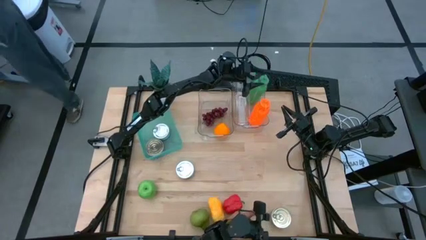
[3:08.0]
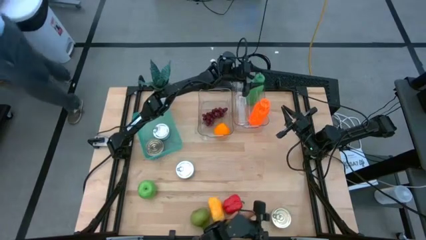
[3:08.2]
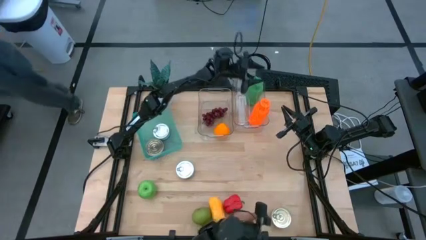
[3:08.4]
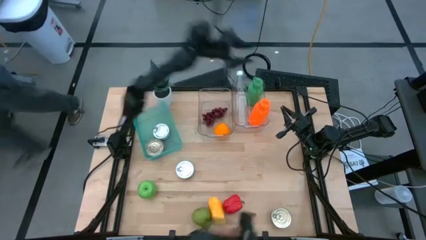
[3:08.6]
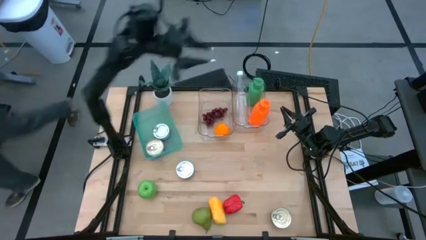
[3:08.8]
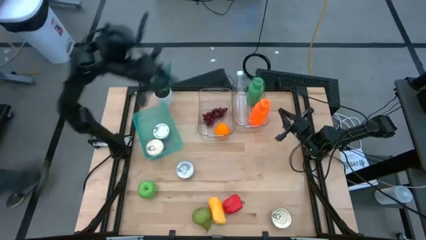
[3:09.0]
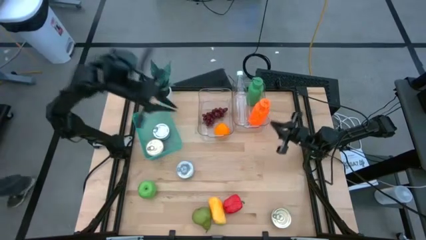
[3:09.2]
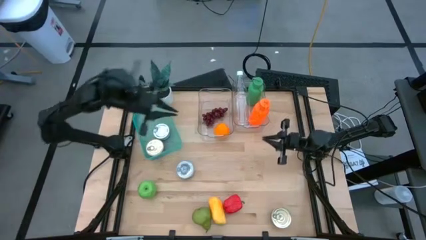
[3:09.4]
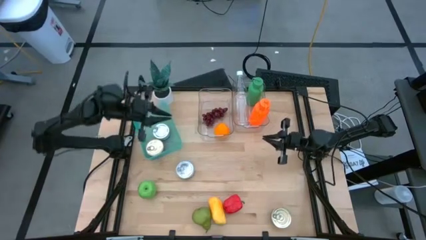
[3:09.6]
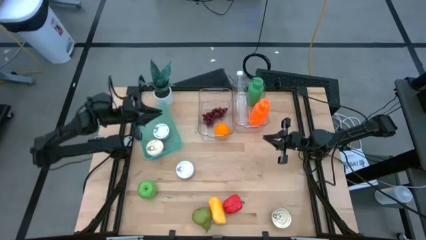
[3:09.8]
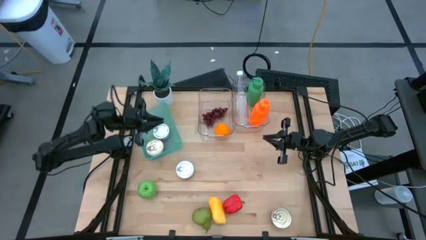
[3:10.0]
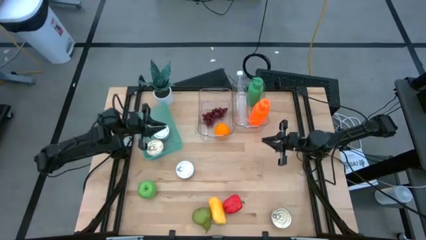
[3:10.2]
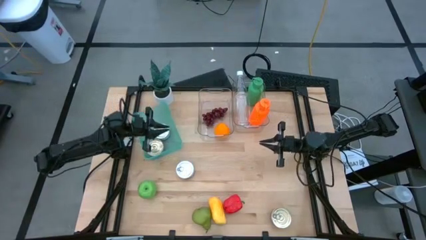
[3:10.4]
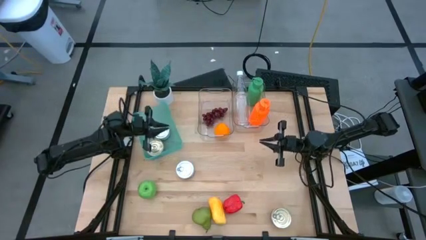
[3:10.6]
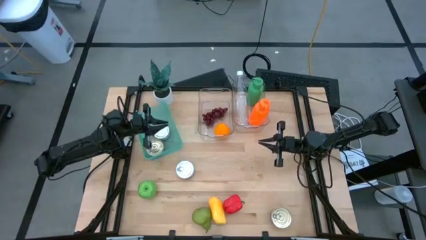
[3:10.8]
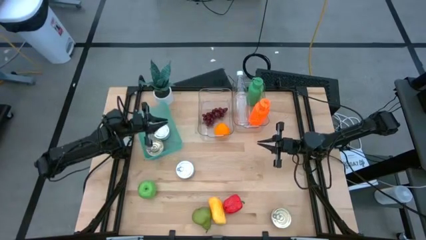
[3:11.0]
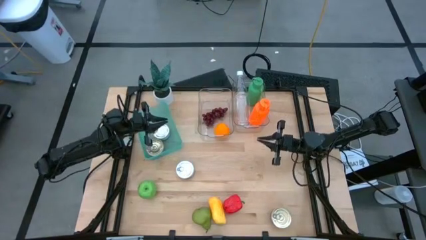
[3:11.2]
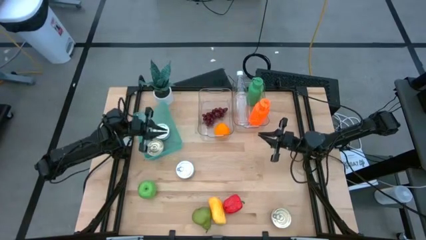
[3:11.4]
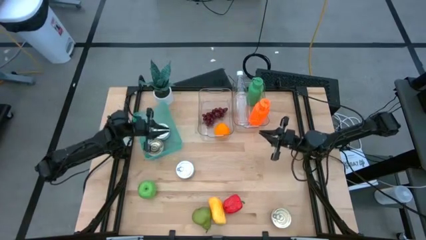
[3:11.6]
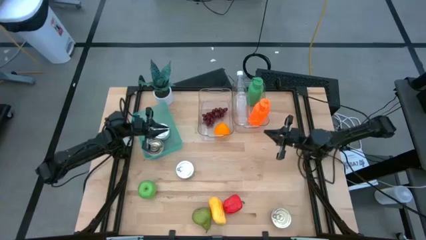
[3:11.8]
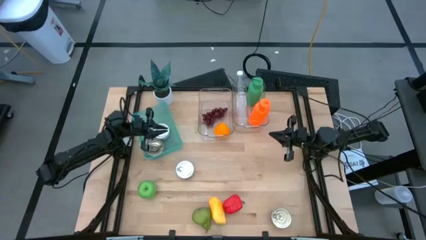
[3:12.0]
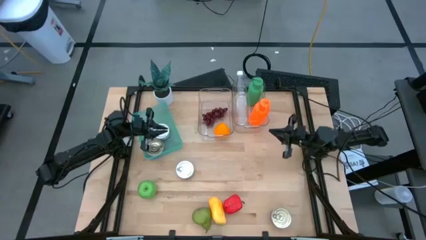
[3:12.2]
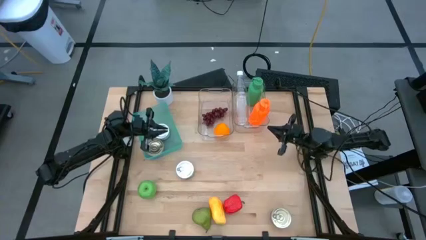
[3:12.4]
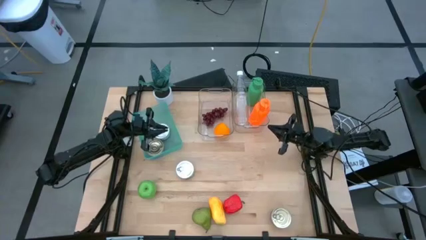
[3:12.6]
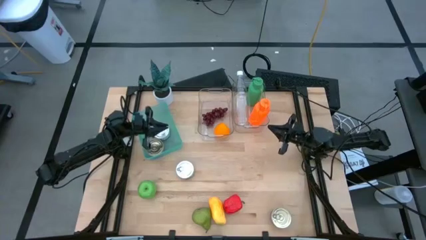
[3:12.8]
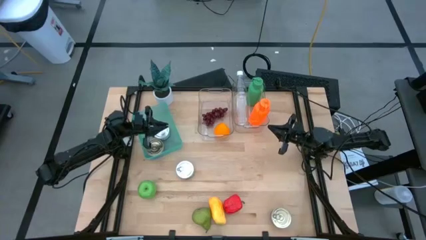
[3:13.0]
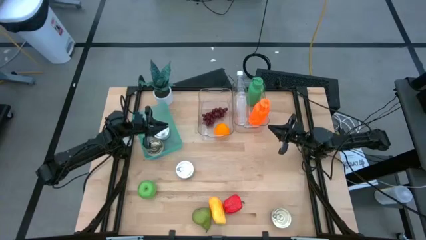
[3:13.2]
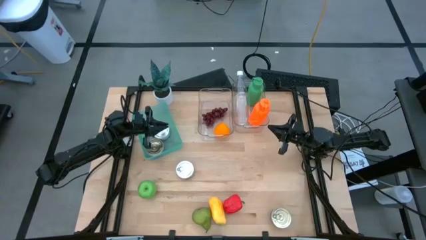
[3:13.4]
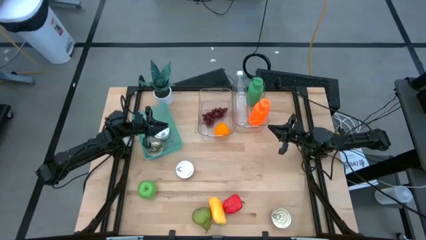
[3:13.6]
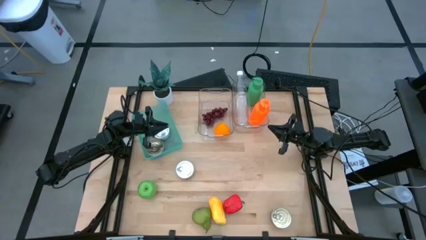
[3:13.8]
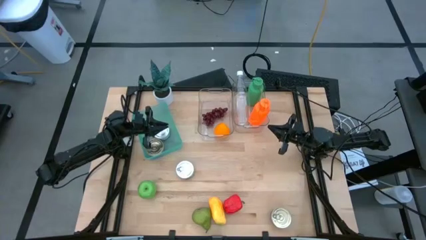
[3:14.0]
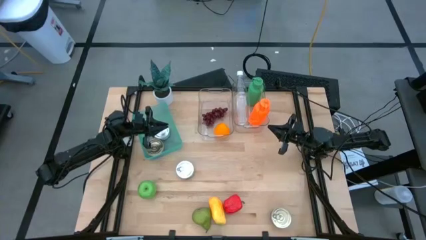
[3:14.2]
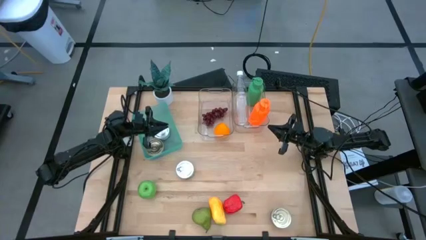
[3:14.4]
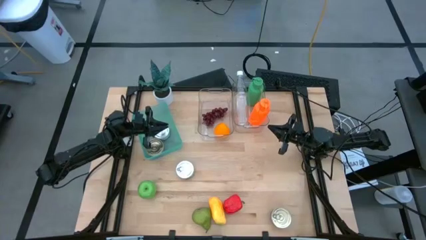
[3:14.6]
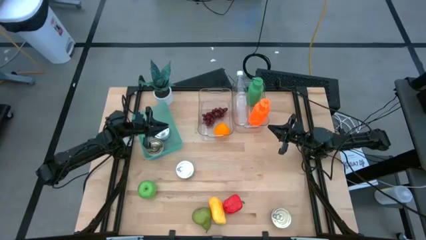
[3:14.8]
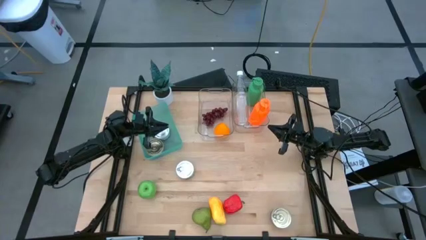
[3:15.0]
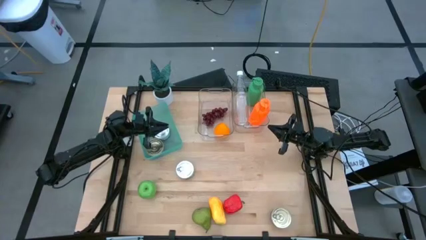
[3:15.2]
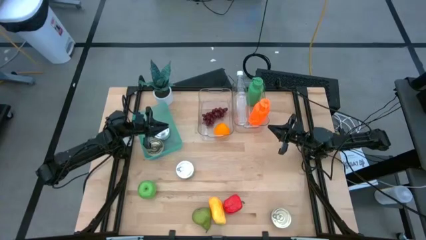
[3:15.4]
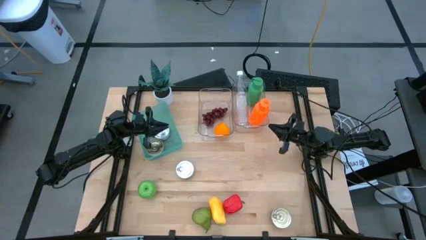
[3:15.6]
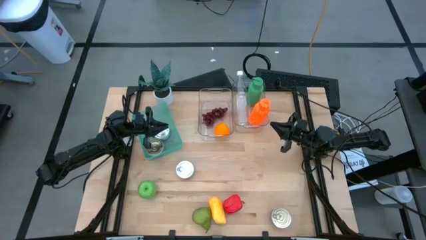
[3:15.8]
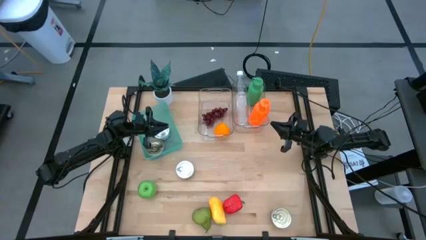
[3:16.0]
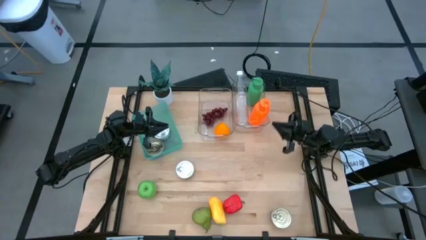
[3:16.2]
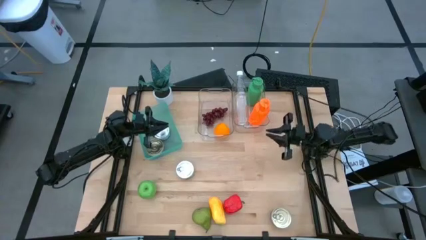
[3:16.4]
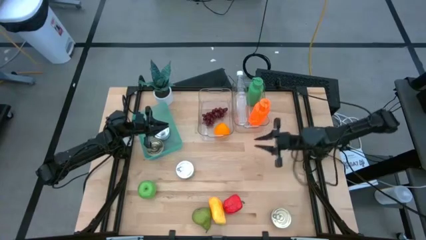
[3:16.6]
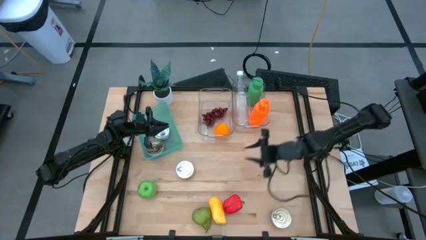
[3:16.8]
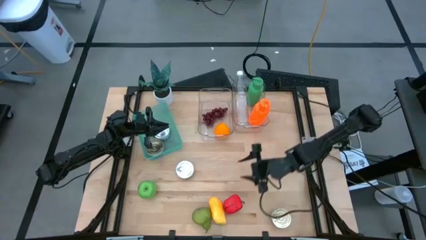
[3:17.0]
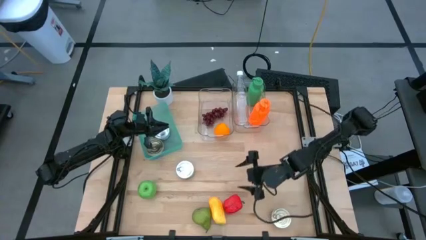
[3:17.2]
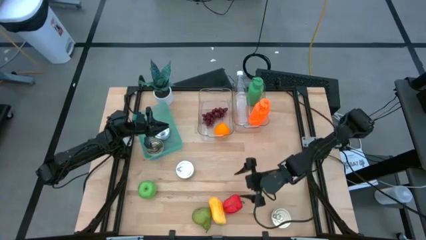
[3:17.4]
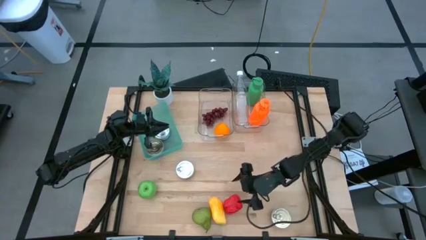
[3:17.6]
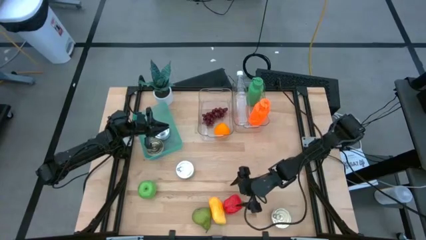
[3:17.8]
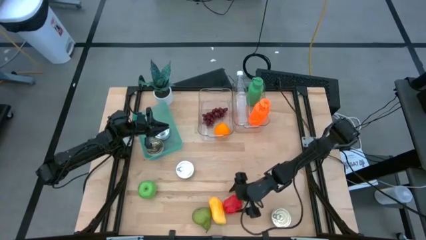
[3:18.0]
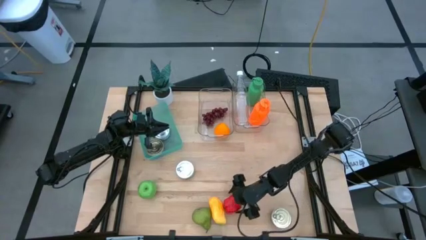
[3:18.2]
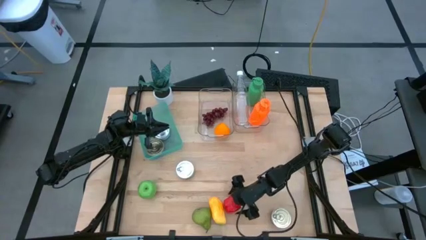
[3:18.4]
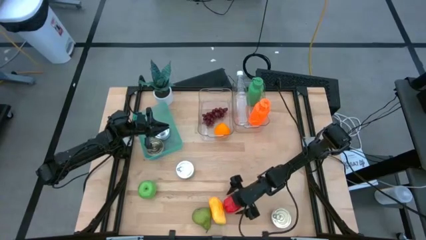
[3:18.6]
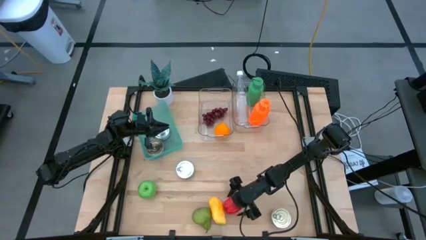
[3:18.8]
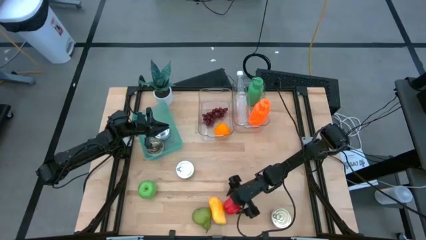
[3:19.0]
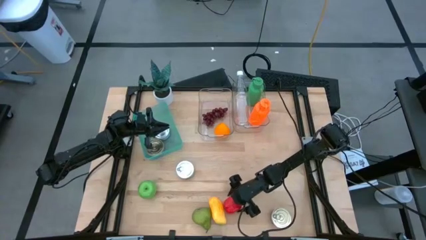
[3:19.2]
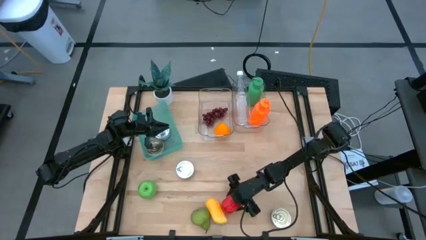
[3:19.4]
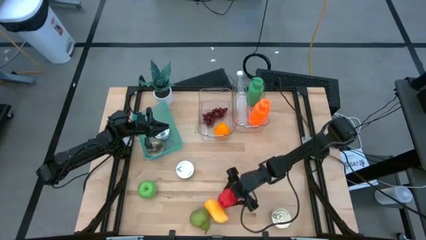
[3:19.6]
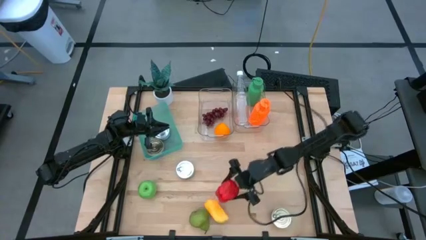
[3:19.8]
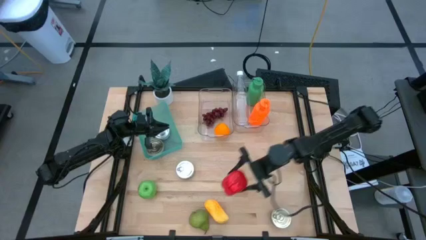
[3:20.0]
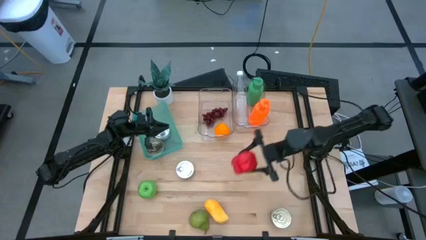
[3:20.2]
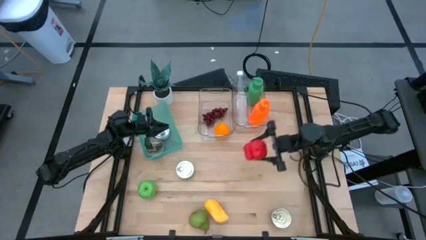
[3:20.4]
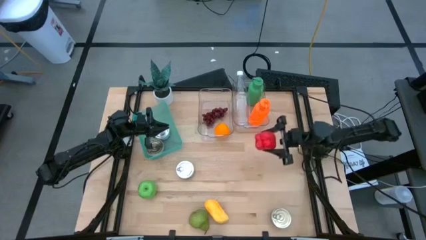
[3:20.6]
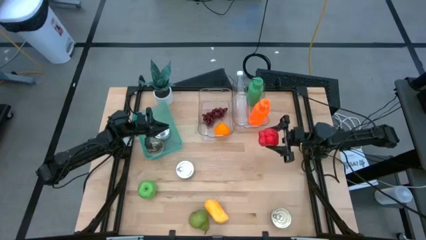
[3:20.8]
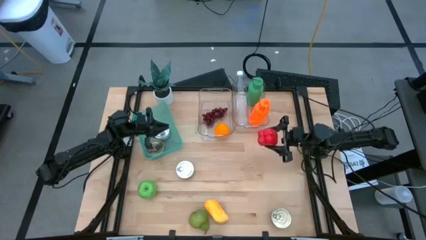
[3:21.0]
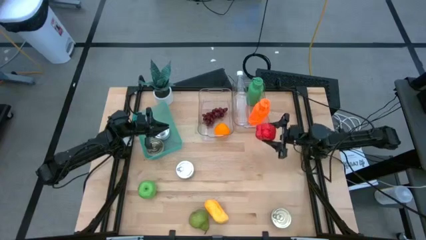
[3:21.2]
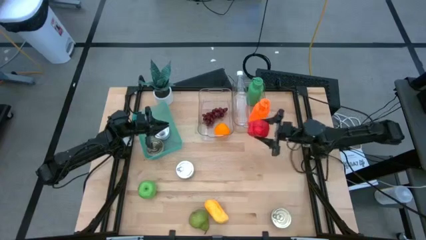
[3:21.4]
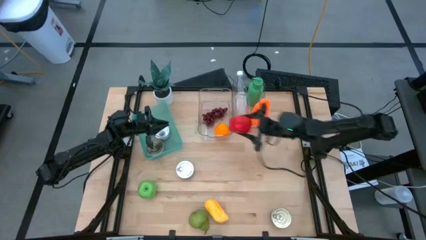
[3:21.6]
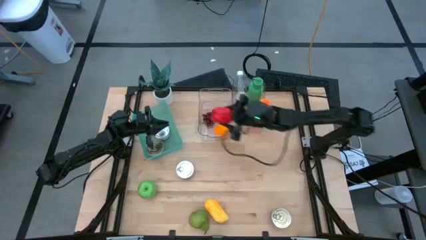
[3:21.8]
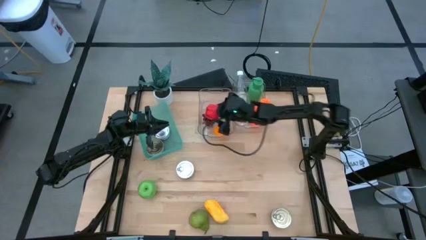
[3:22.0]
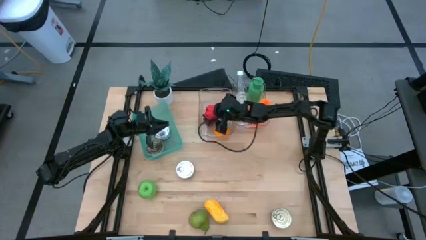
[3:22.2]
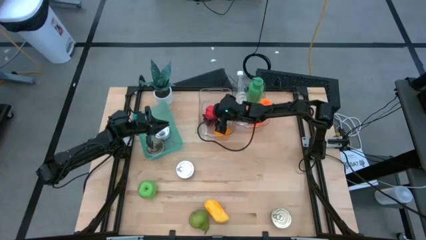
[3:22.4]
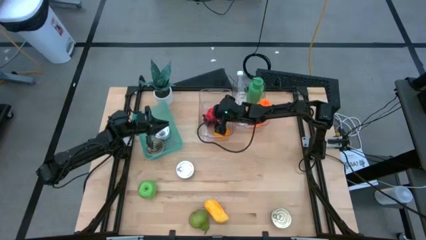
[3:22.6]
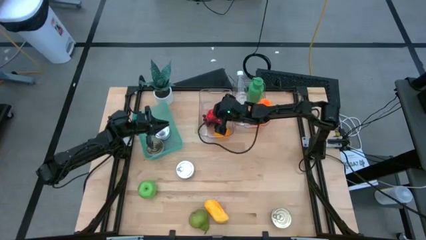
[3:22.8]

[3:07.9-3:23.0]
Task: Pick & Place Food Item
Put the red bell pepper into the left transparent bin
